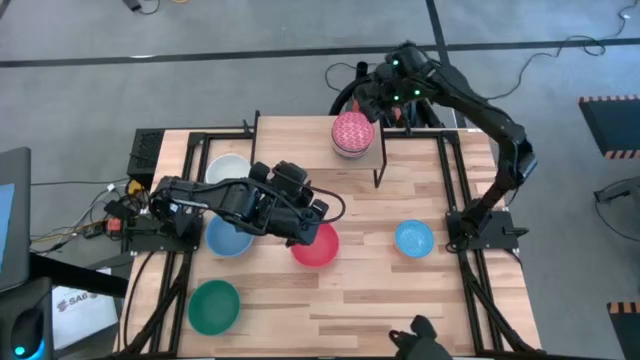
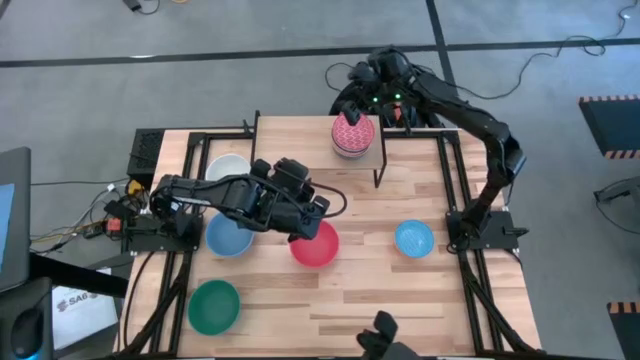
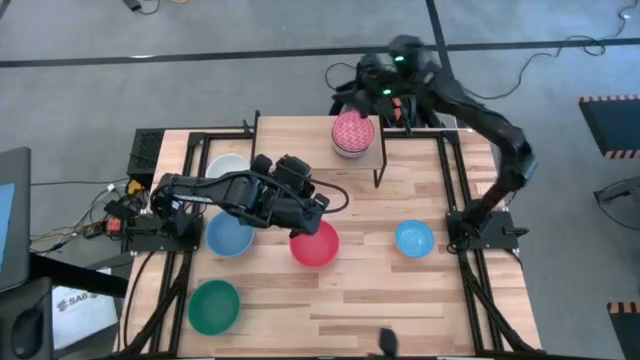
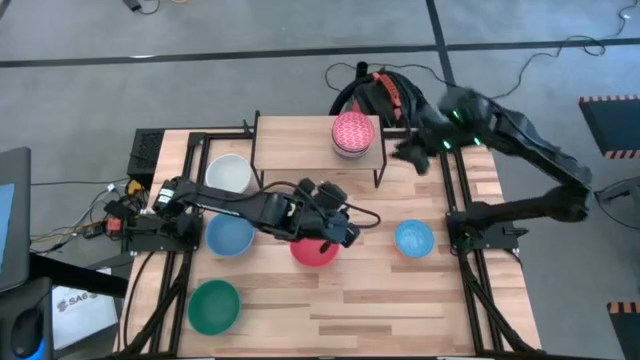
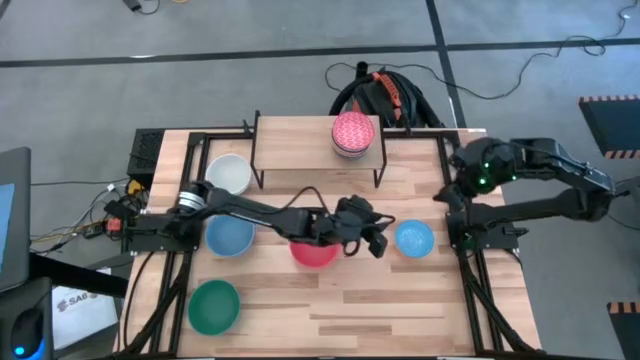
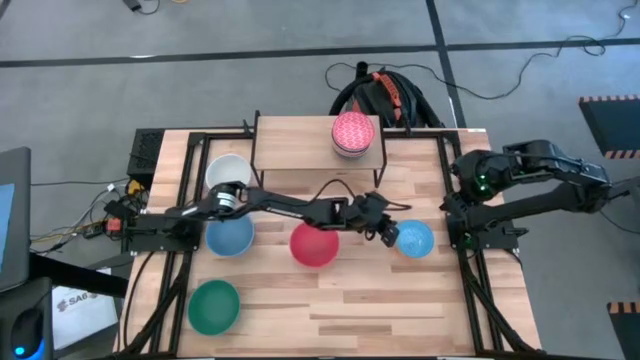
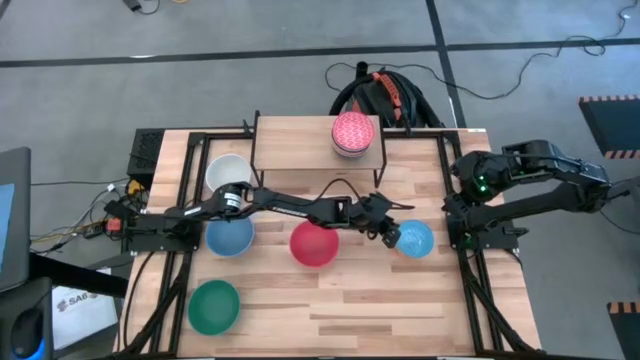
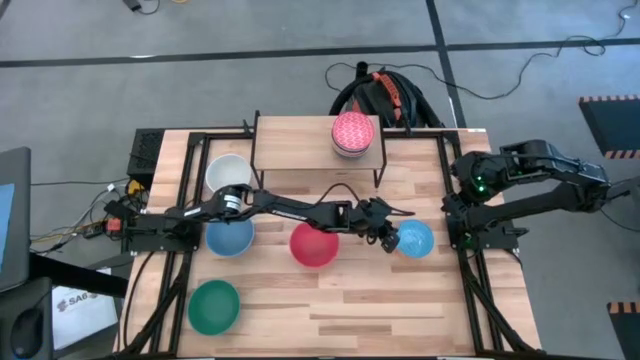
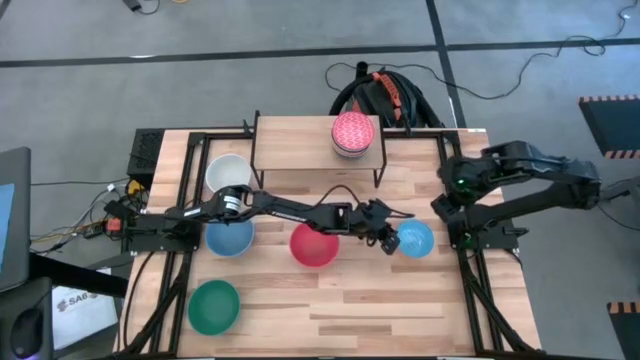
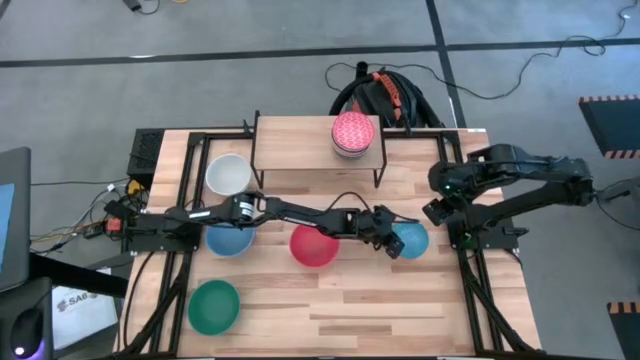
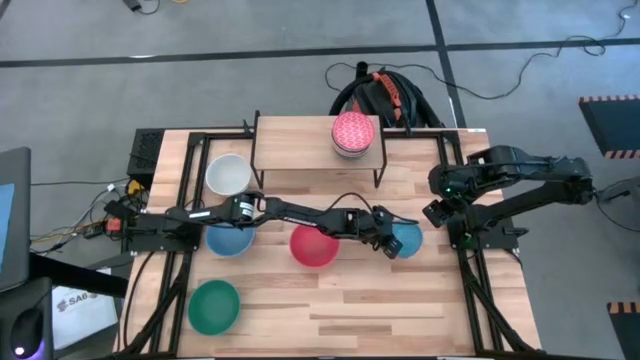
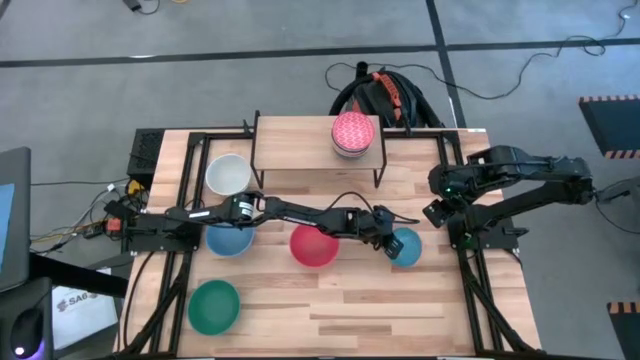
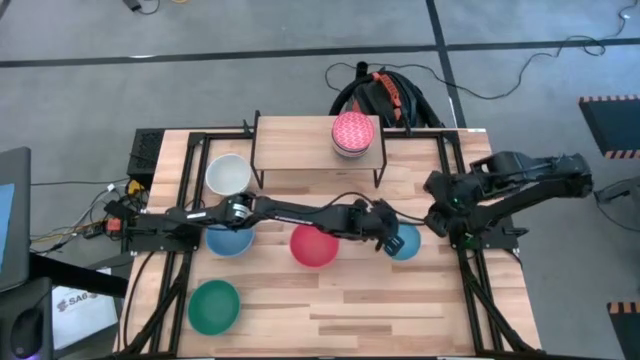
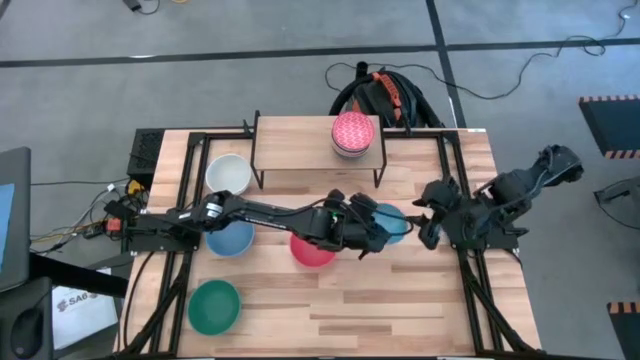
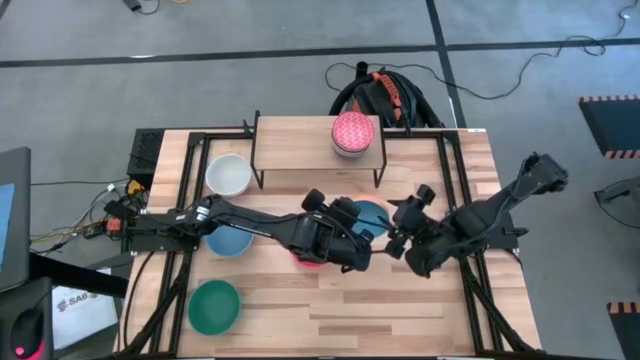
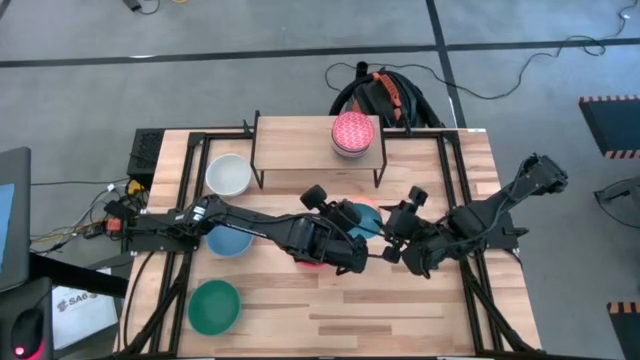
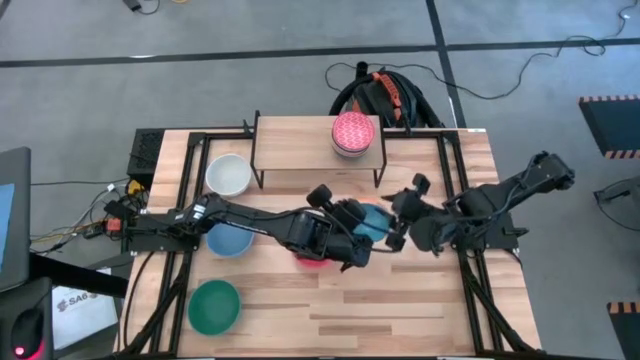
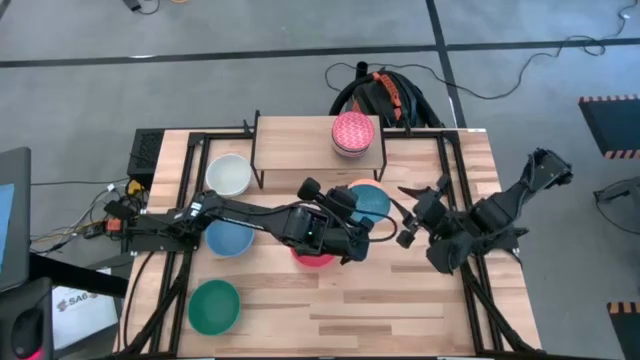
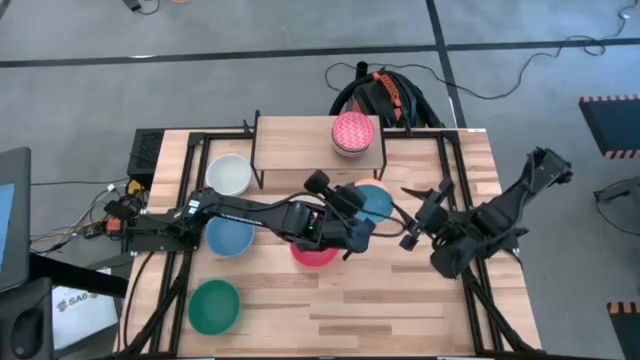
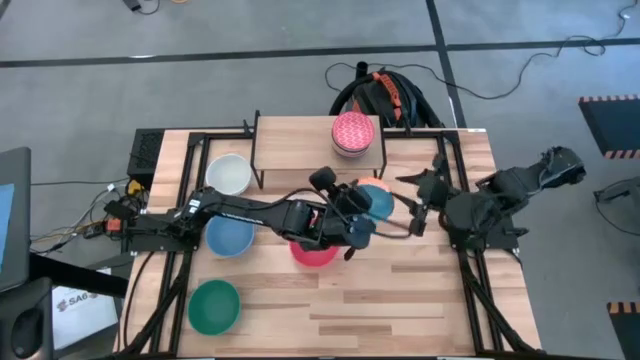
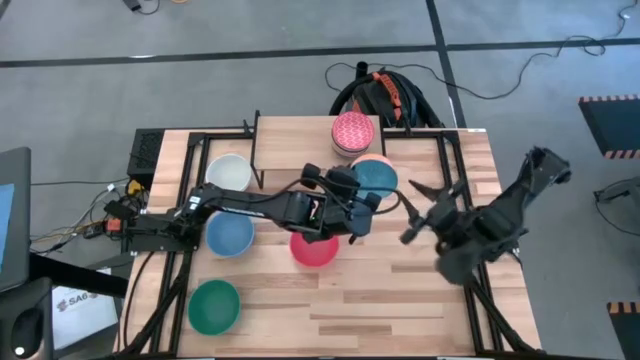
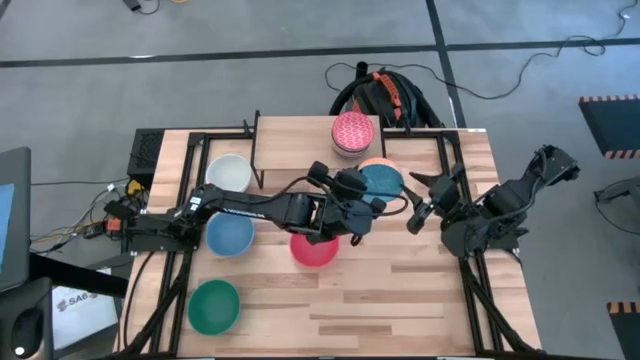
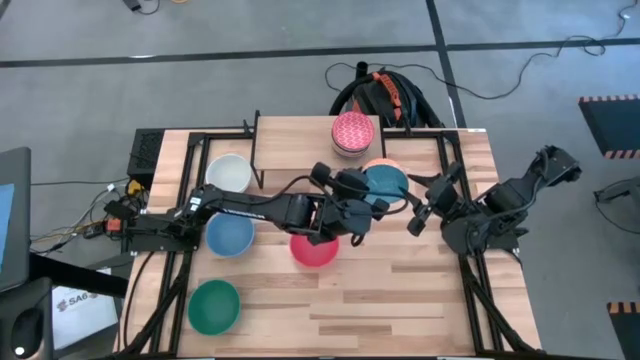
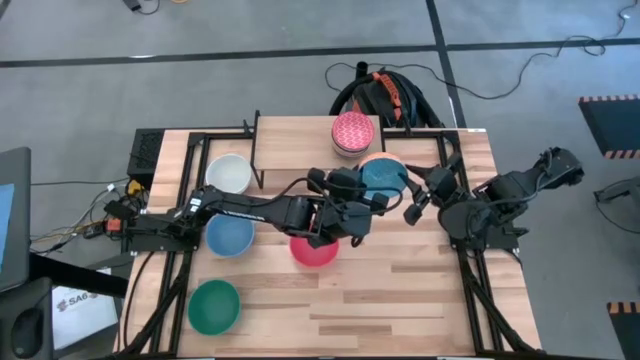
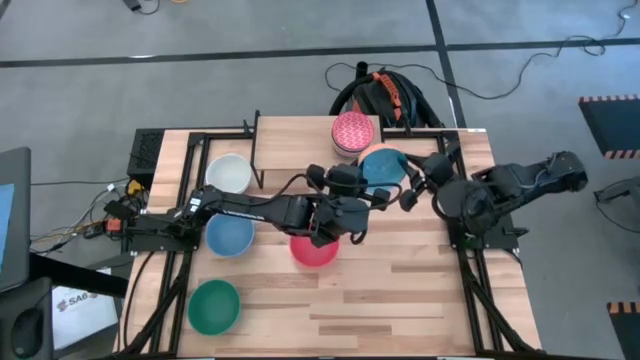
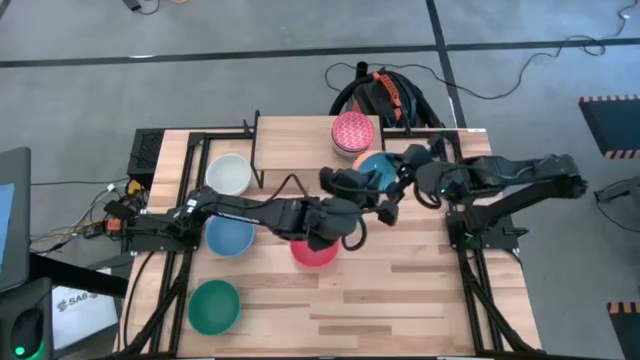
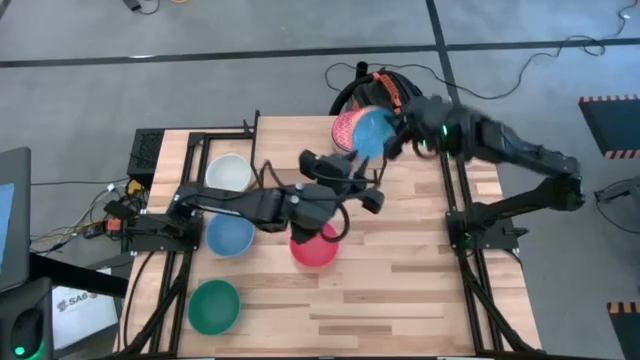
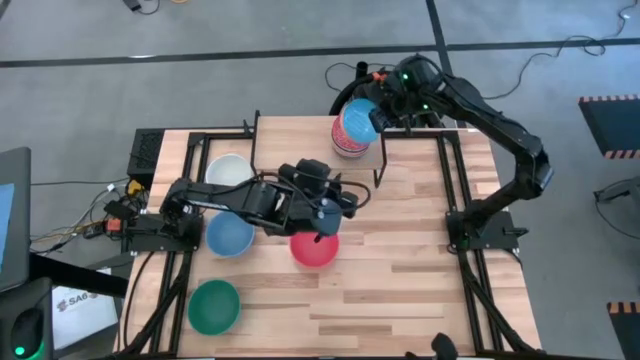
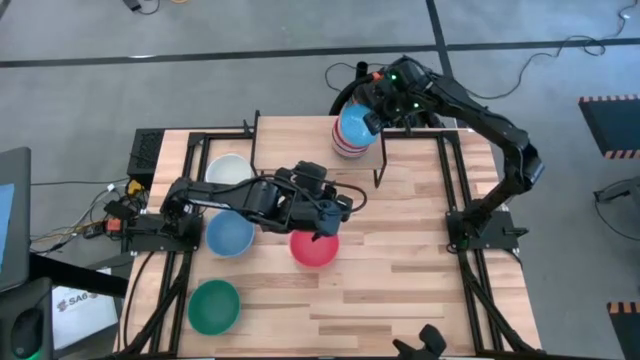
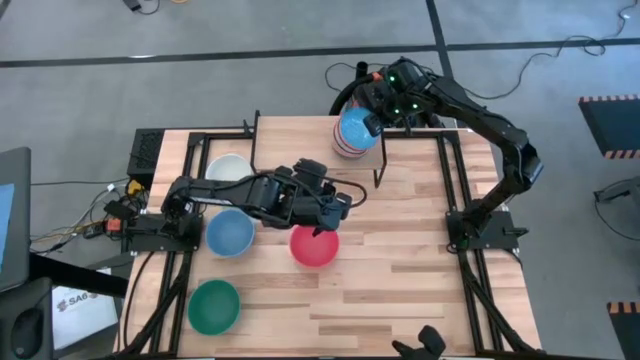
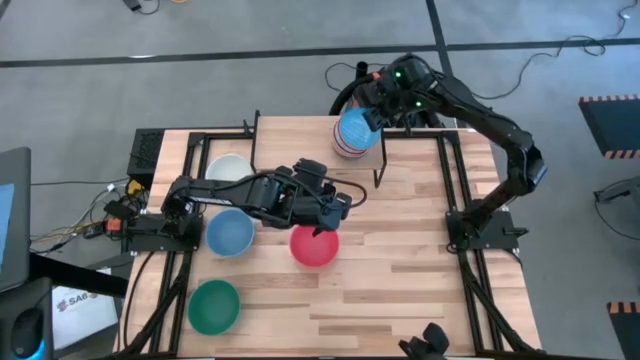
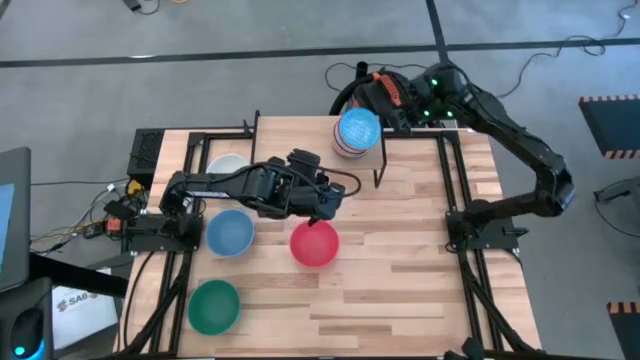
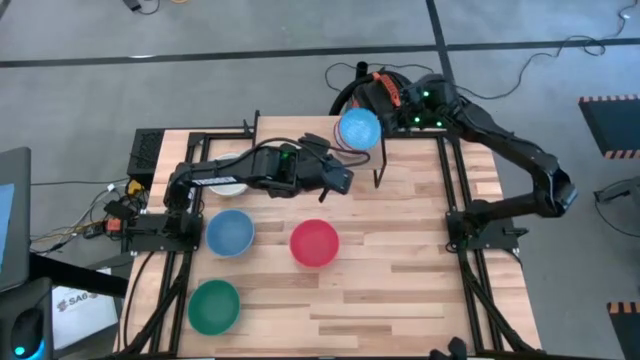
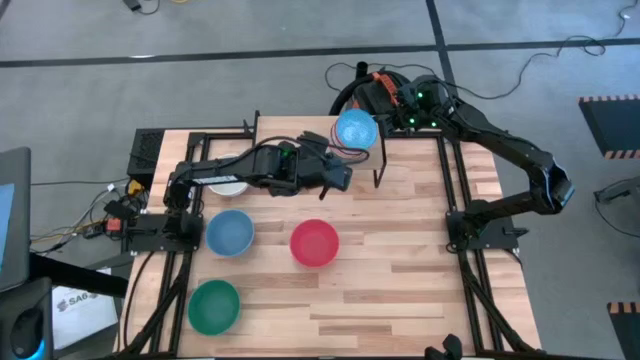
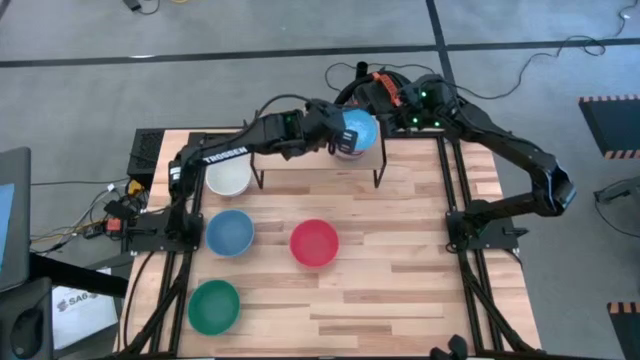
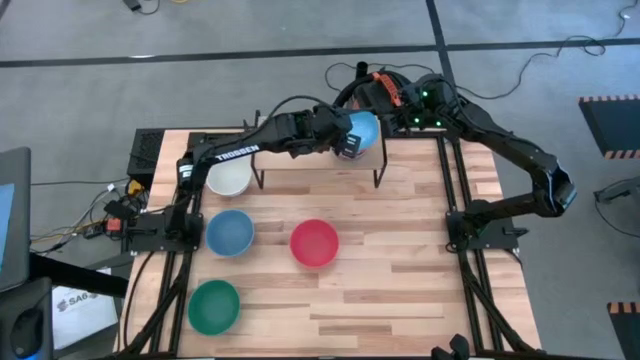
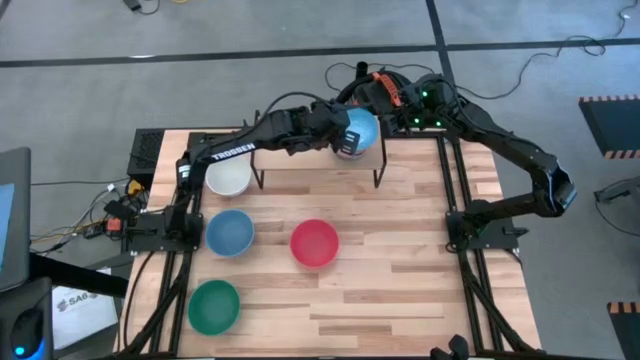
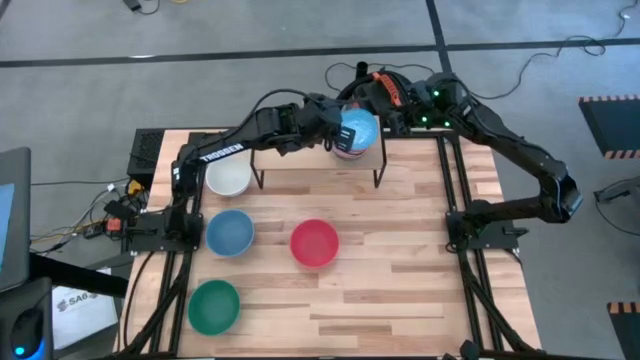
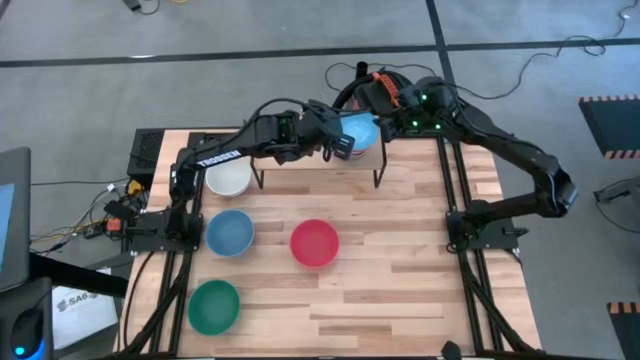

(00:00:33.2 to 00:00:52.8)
Task: Place and stack bowls onto a shelf
Stack the light blue patterned bowl on top of the red patterned bowl on the shelf

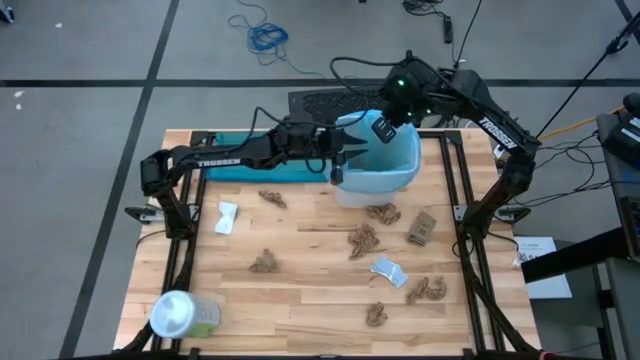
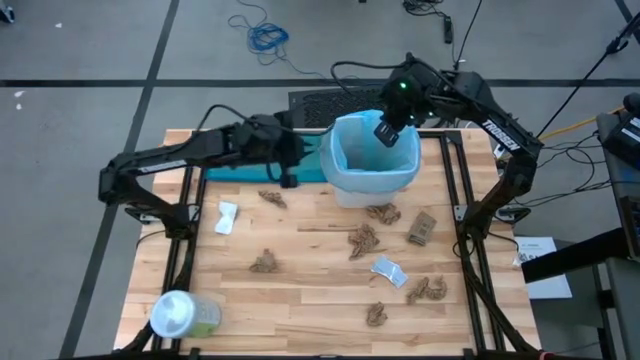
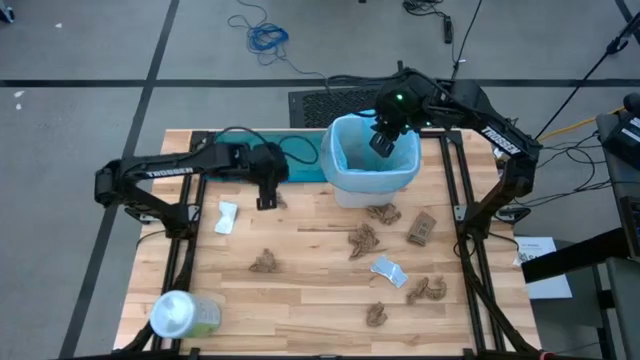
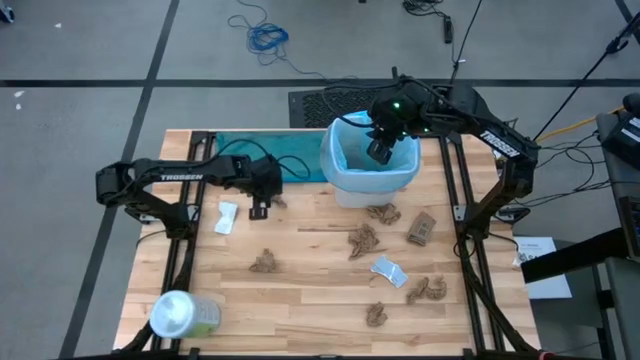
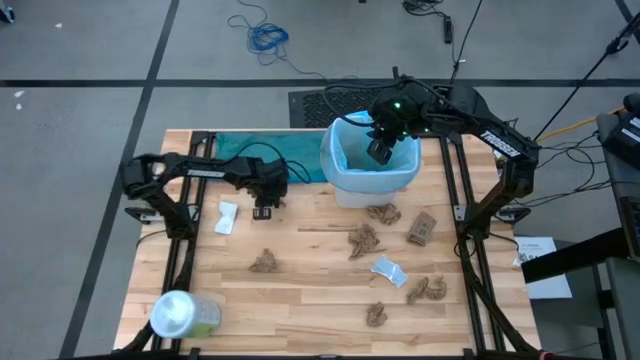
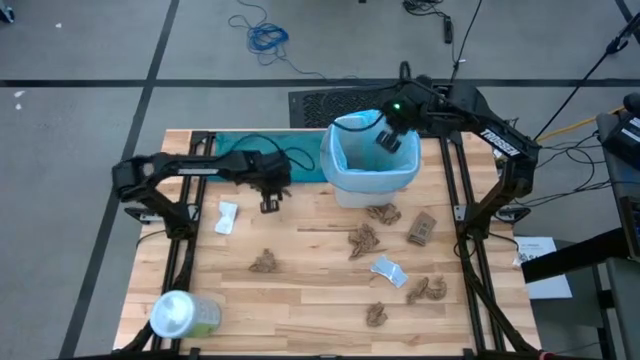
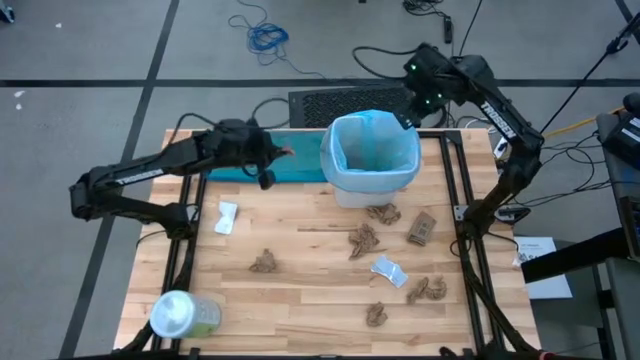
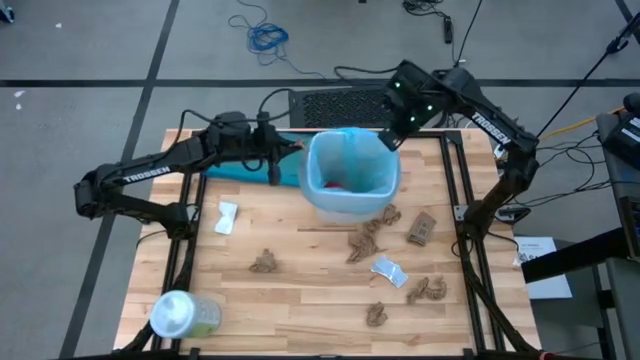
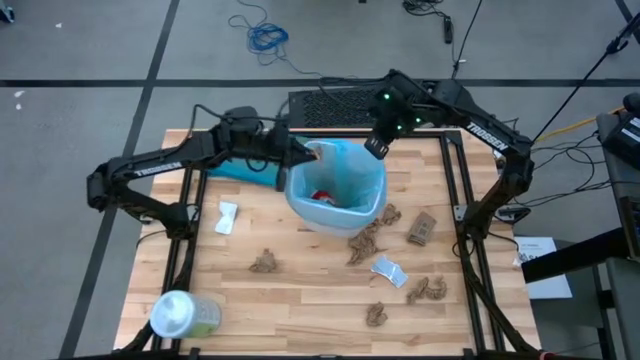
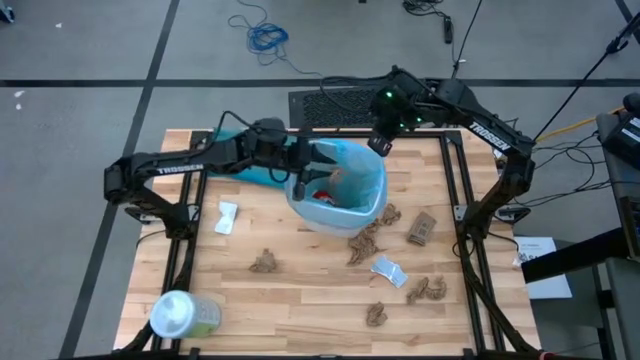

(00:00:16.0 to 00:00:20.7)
Task: place trash/remove bag and relplace
Put the brown napkin into the trash bin
